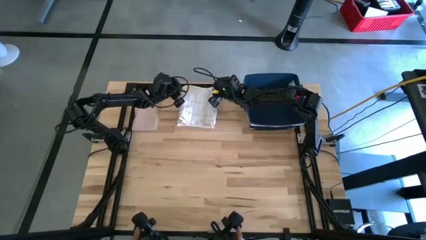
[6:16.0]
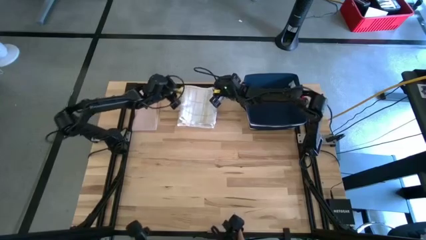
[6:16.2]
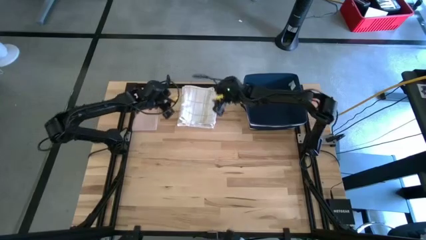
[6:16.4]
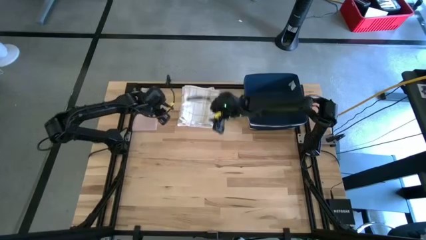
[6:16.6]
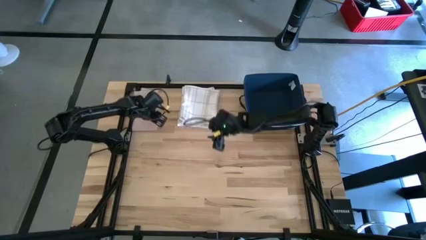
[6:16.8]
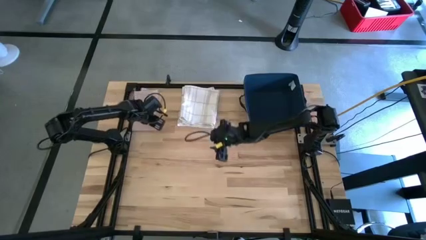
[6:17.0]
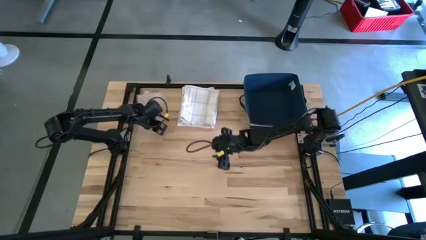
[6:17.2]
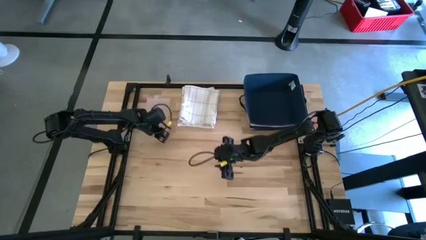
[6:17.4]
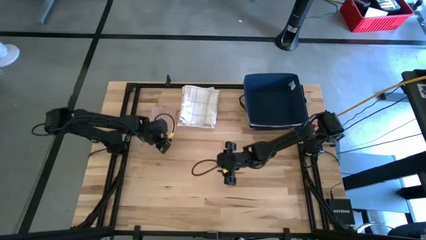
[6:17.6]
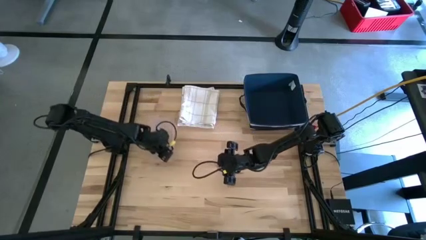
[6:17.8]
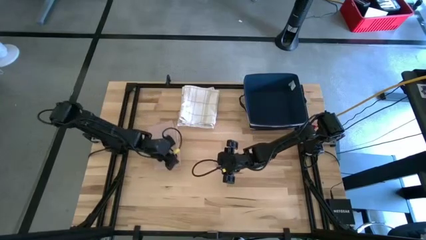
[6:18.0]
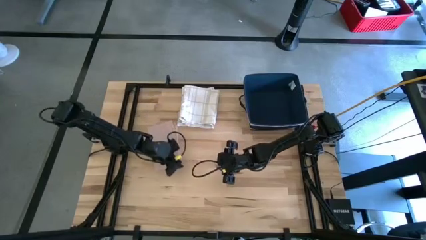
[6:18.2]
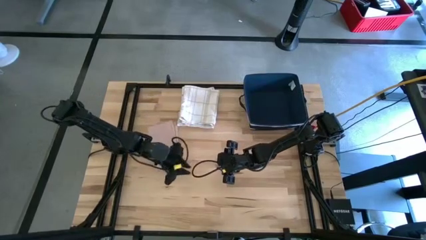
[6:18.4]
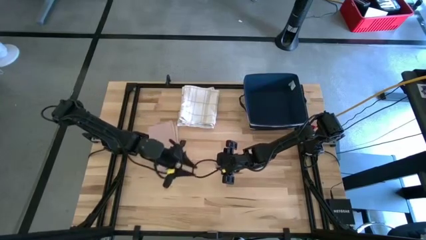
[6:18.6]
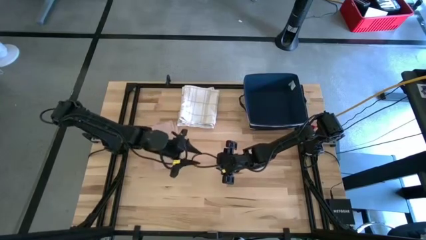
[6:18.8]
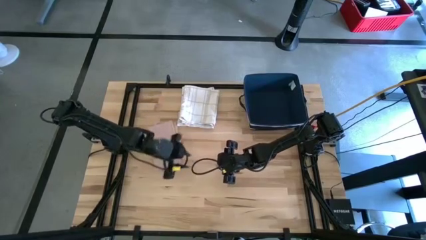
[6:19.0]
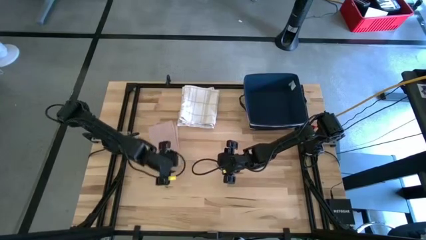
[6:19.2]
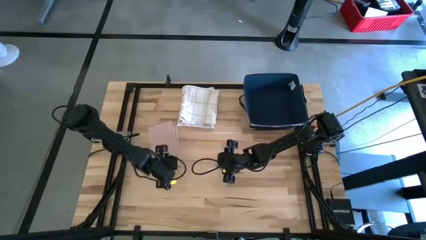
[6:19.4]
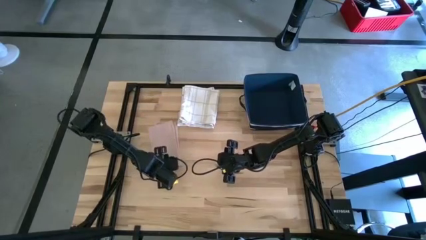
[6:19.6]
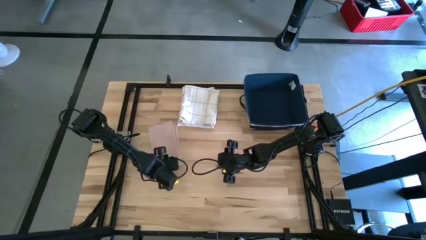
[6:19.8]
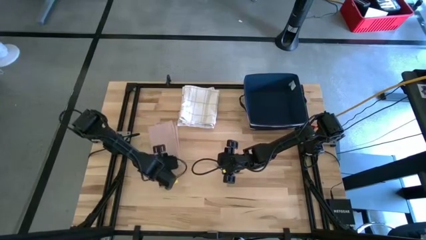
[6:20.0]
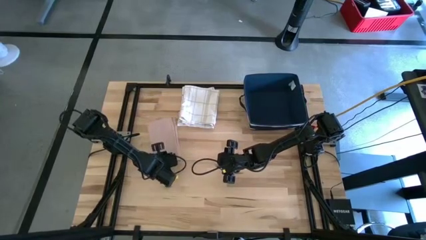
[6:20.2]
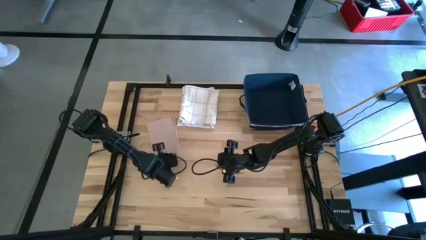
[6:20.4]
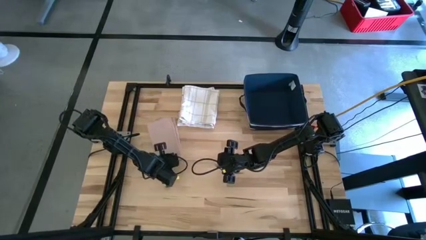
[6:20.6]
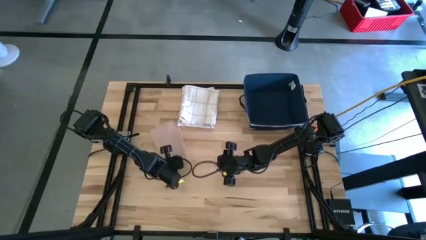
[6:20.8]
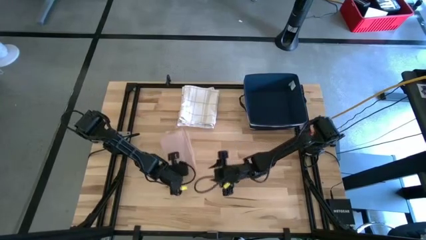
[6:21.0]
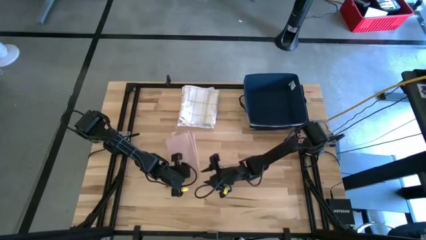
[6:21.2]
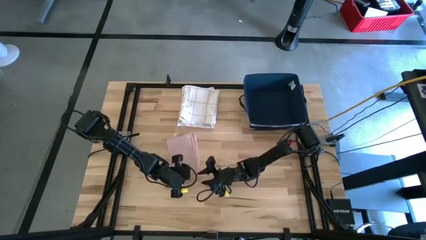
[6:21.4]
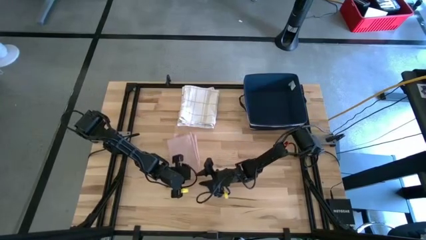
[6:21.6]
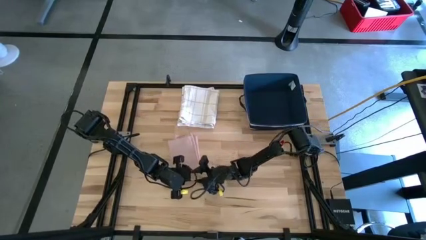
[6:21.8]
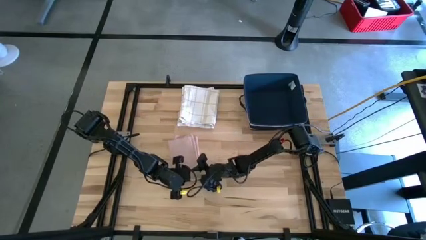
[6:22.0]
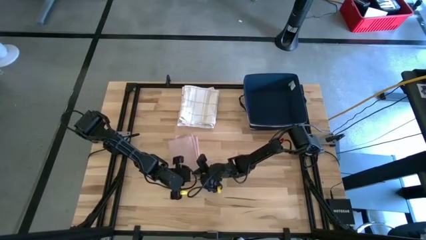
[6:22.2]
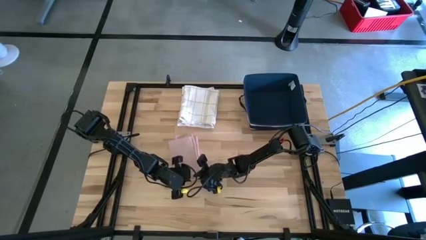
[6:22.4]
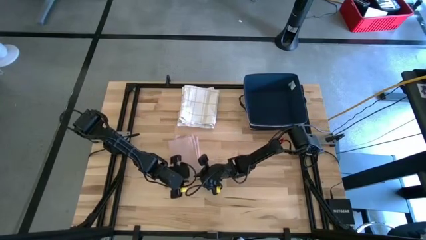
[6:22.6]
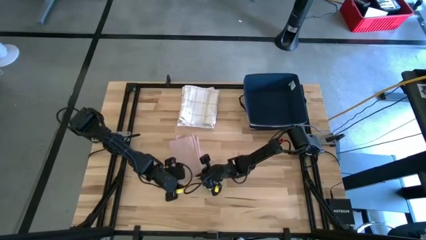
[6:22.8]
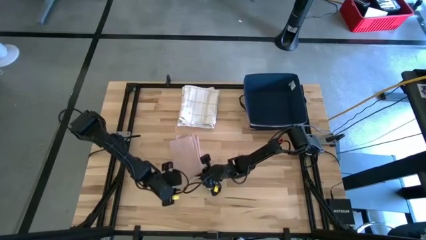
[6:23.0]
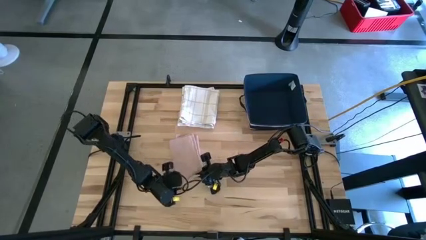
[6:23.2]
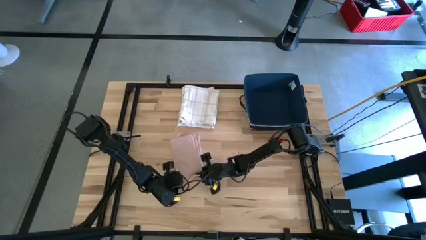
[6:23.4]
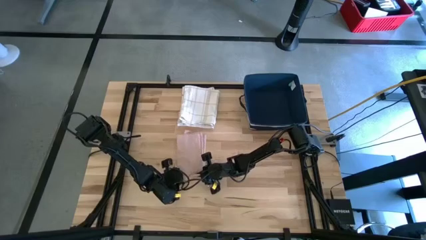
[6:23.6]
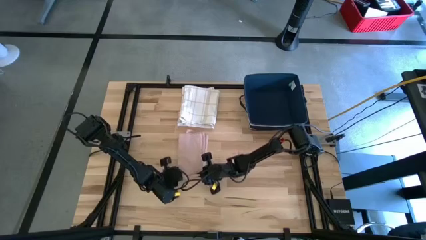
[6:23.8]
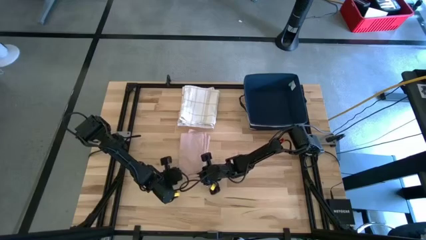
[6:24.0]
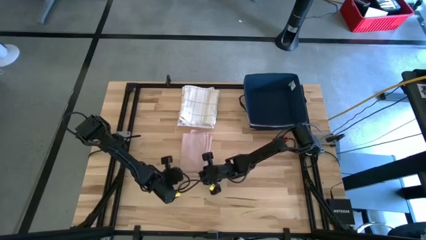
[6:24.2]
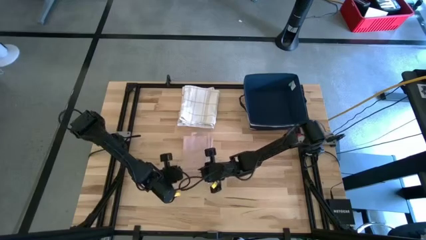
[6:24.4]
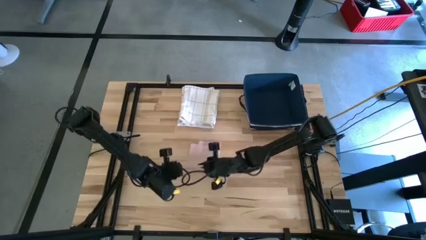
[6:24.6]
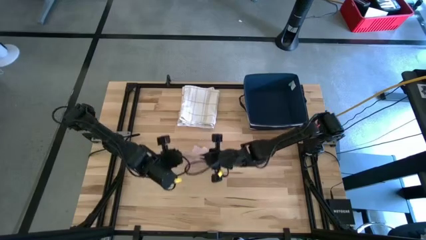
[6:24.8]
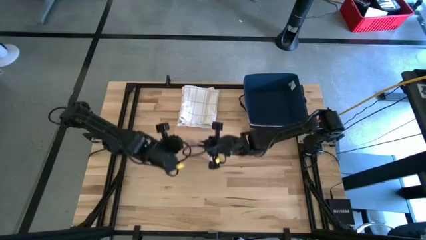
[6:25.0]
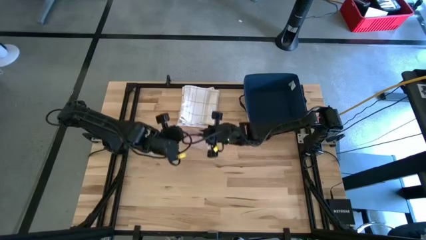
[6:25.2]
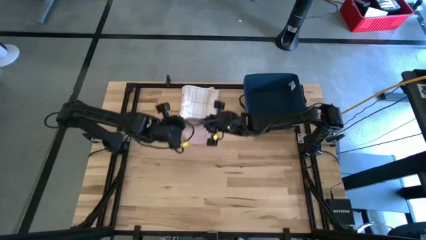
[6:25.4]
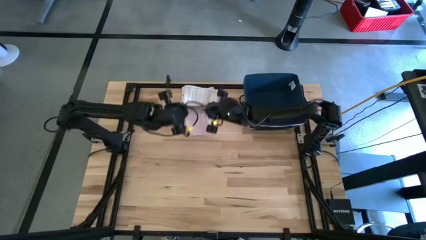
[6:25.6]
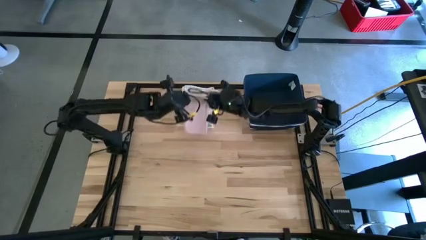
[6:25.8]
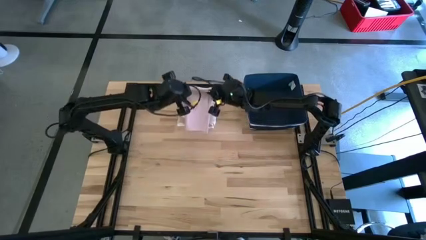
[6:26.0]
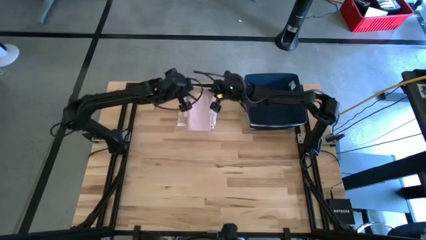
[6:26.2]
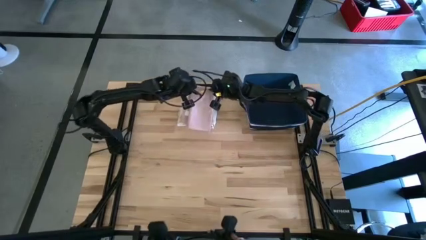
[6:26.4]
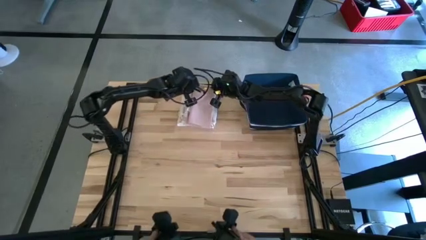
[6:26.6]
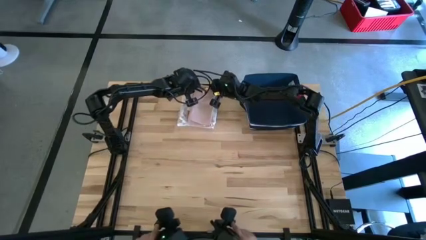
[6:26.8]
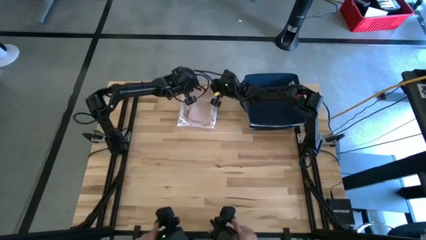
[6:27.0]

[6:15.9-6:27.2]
Task: Fold towel
Stack the pink towel on the white patterned towel

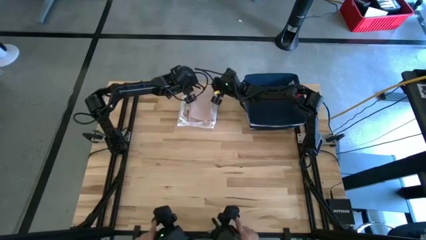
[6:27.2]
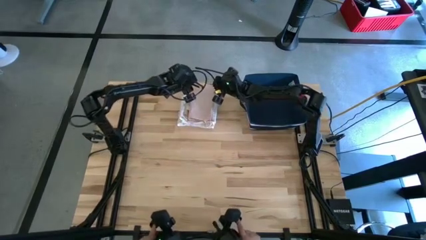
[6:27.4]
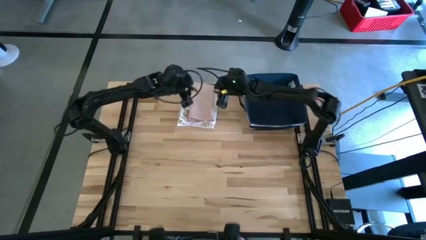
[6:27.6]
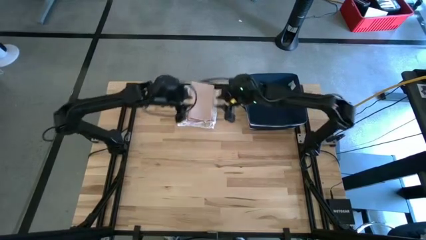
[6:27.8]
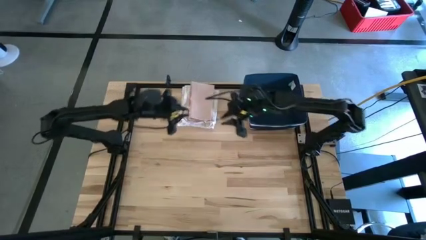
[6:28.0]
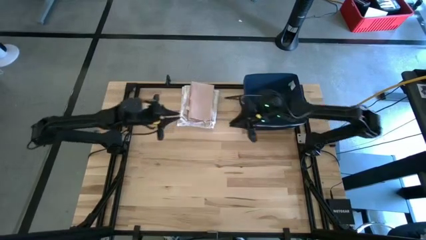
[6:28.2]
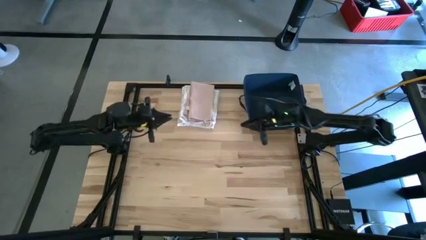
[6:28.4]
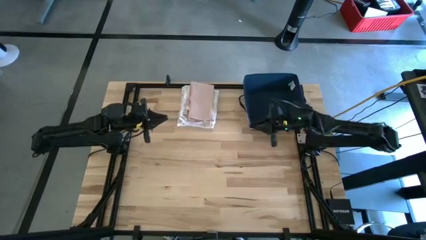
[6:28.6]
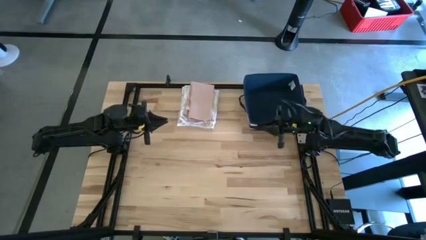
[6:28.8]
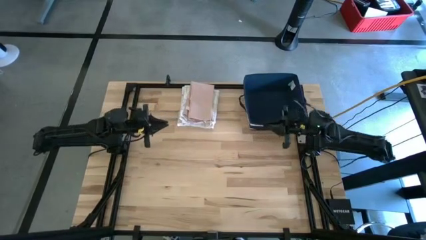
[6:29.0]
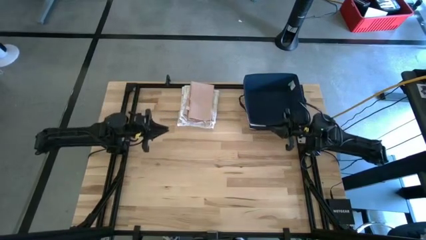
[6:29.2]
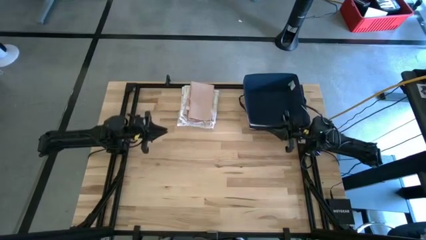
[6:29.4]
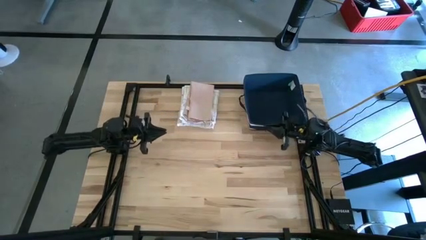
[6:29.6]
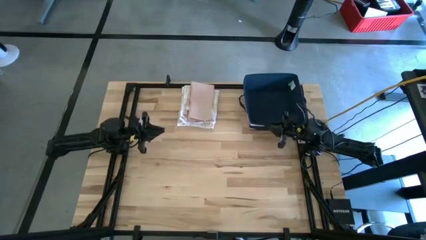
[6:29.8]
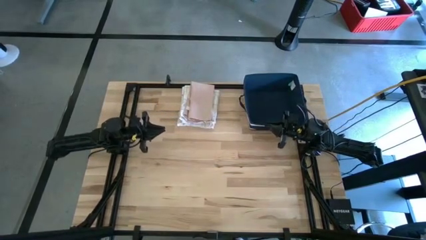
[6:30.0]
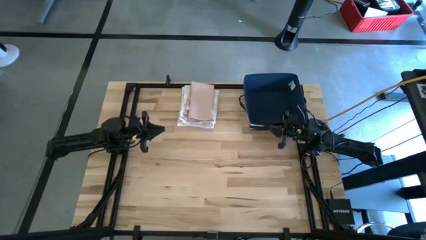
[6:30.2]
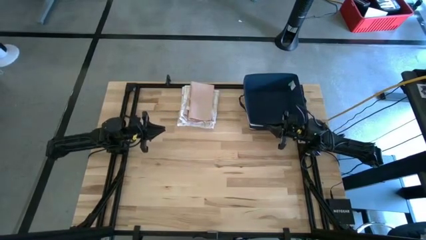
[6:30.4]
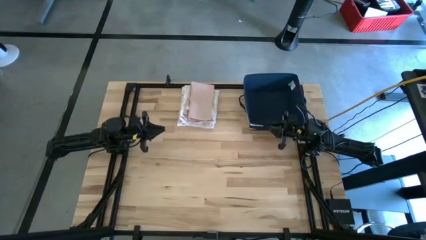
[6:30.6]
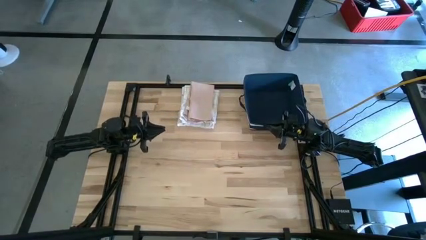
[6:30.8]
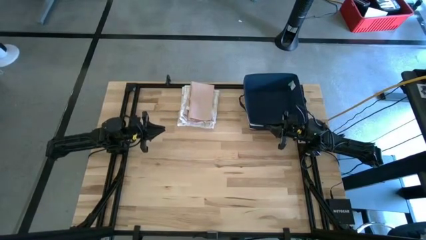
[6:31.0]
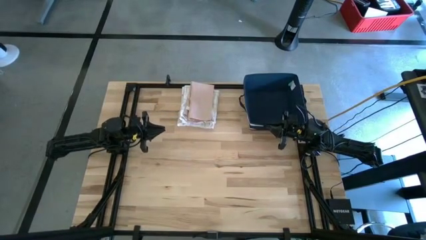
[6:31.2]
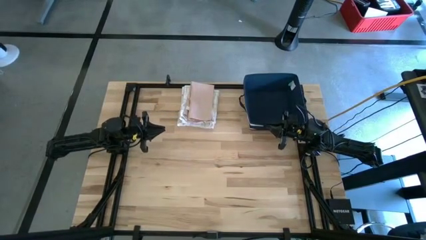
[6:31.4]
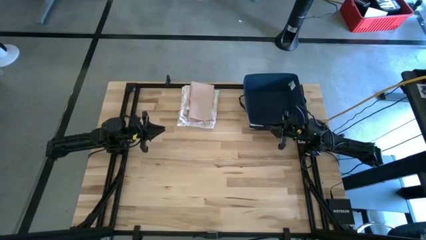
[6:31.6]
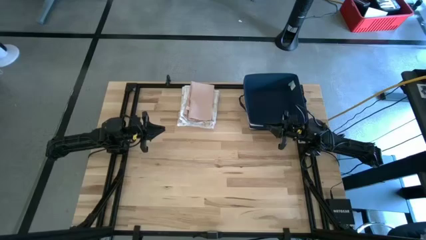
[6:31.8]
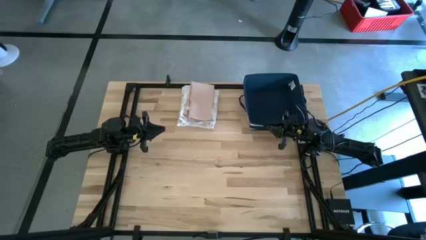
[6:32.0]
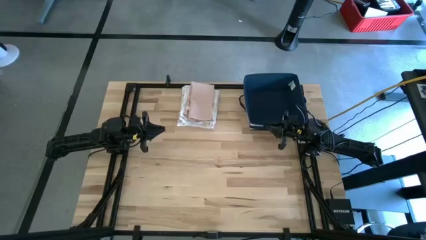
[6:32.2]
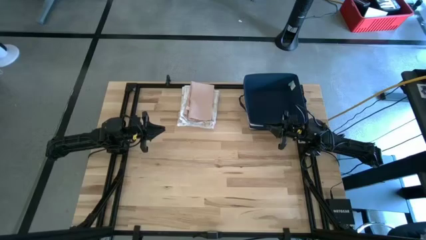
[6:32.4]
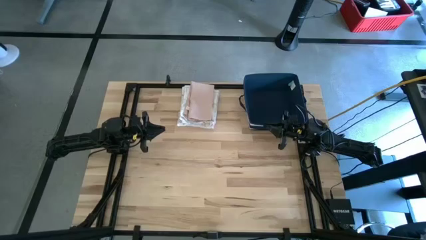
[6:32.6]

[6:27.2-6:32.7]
Return to Home Position
